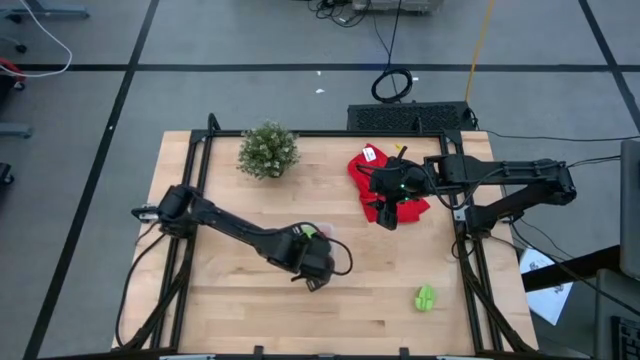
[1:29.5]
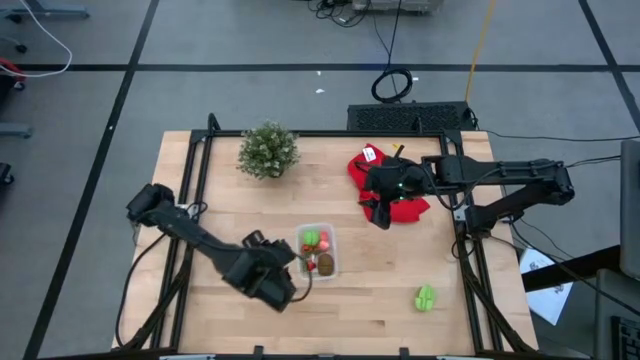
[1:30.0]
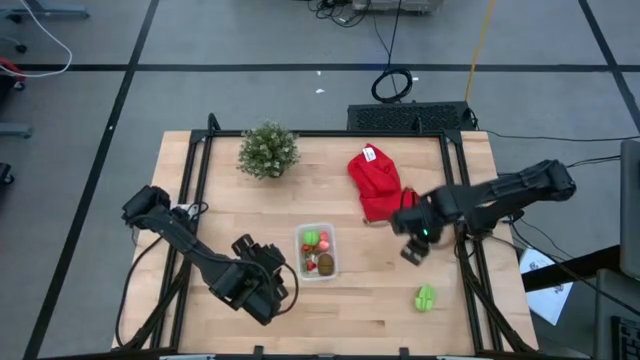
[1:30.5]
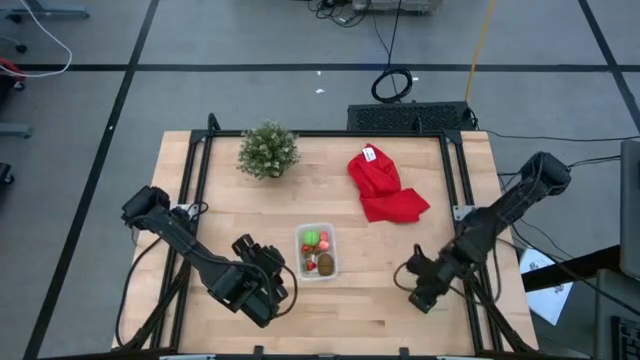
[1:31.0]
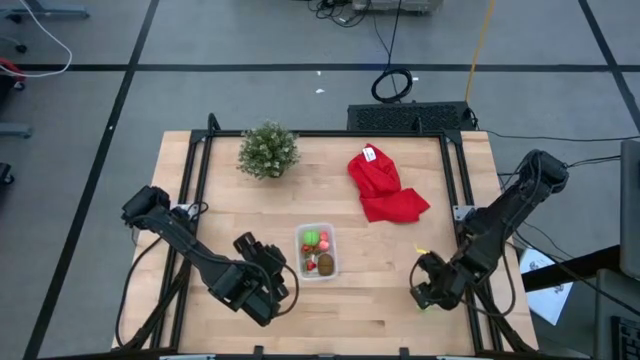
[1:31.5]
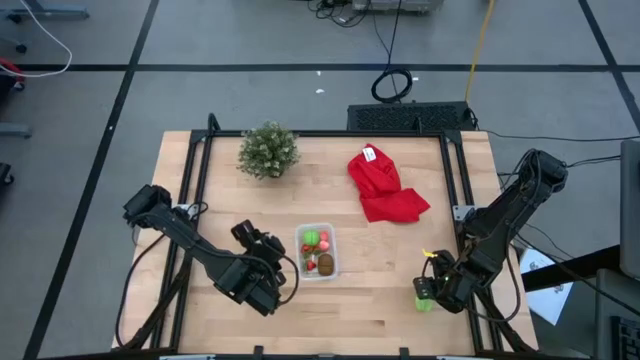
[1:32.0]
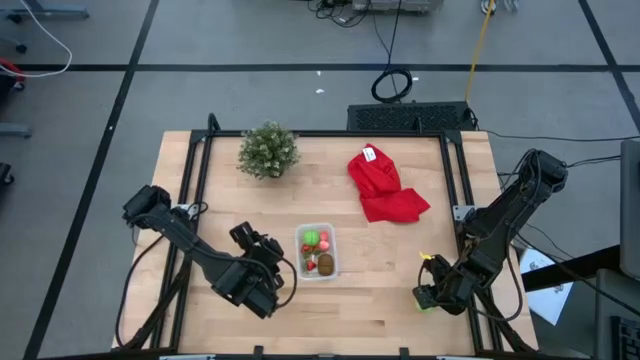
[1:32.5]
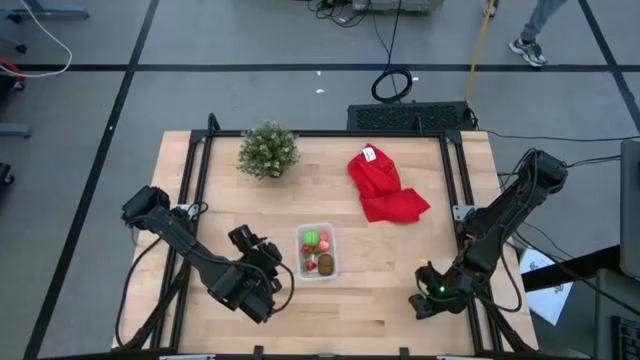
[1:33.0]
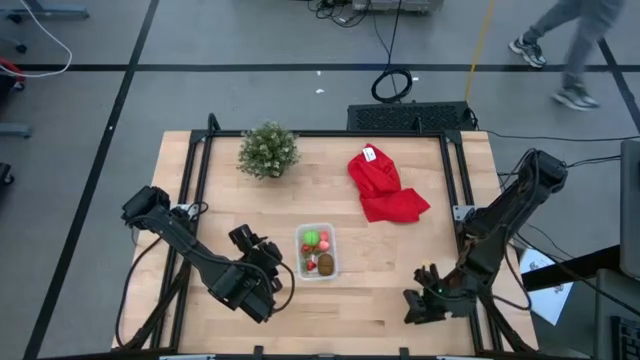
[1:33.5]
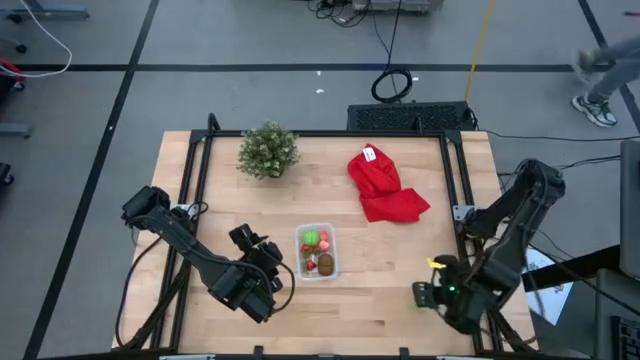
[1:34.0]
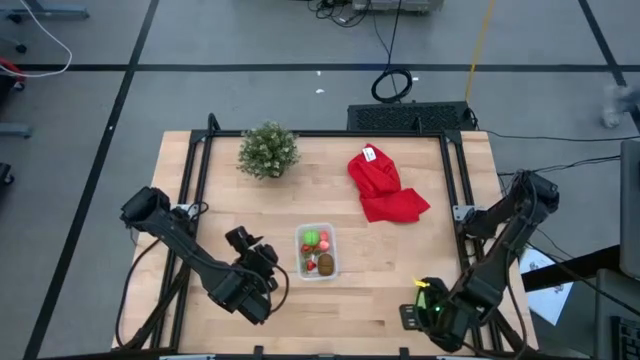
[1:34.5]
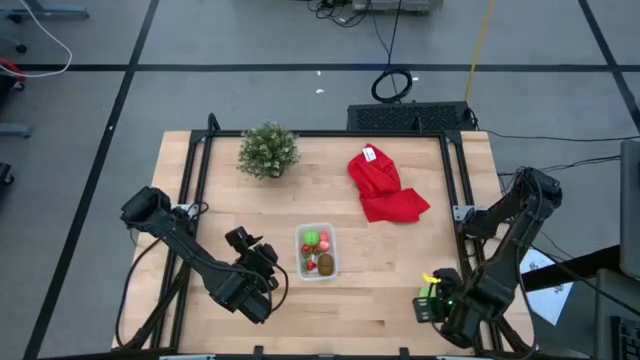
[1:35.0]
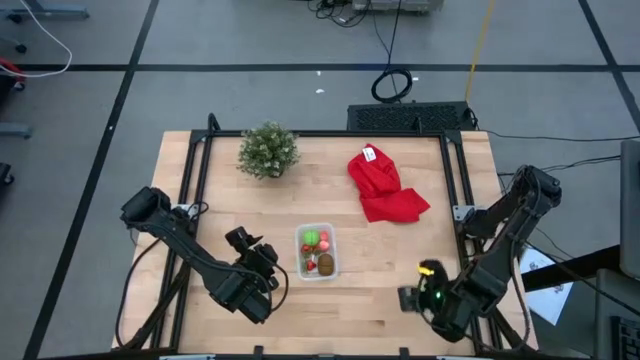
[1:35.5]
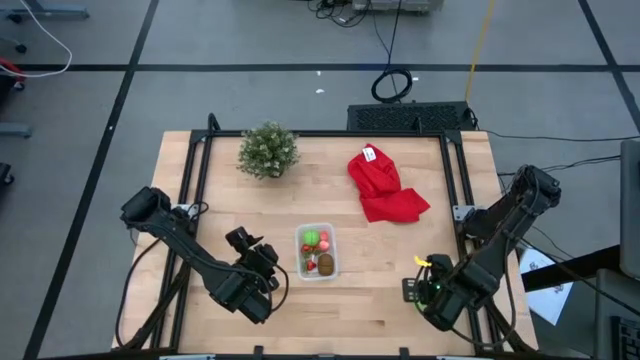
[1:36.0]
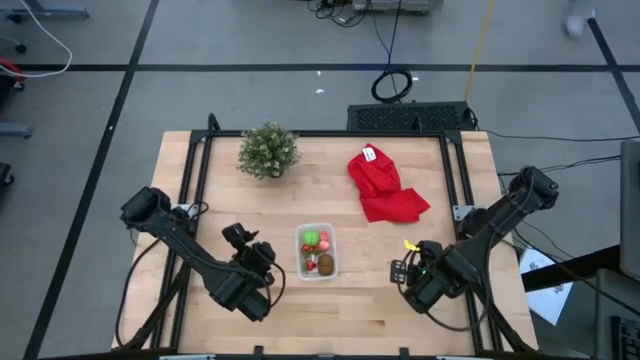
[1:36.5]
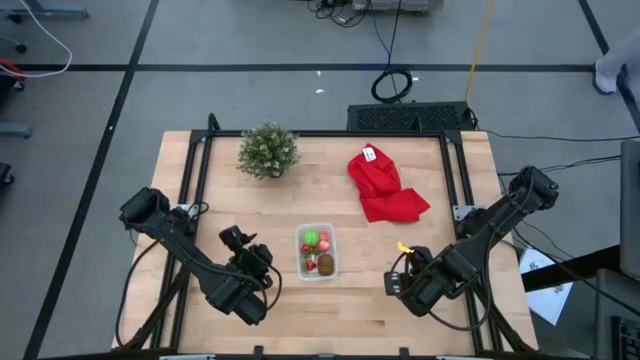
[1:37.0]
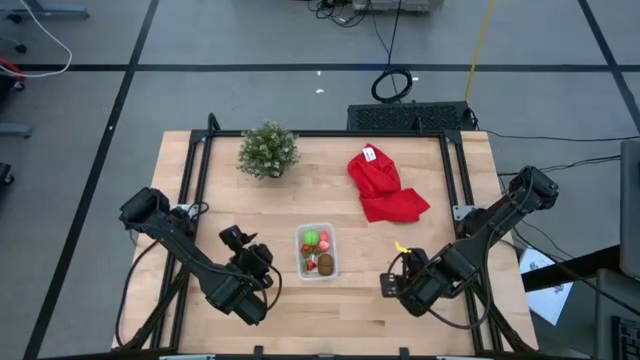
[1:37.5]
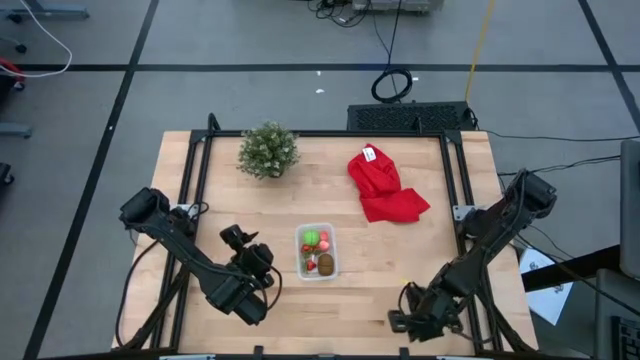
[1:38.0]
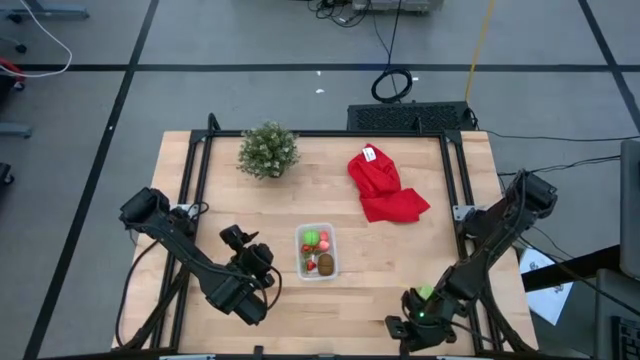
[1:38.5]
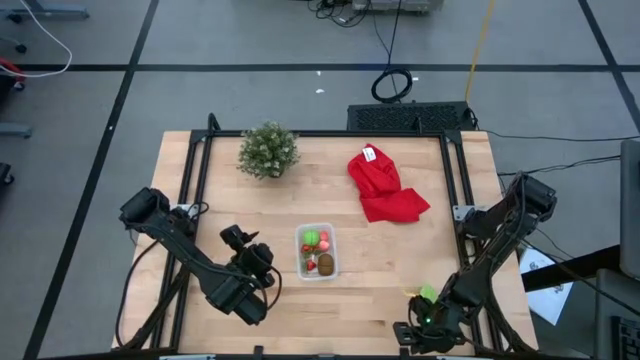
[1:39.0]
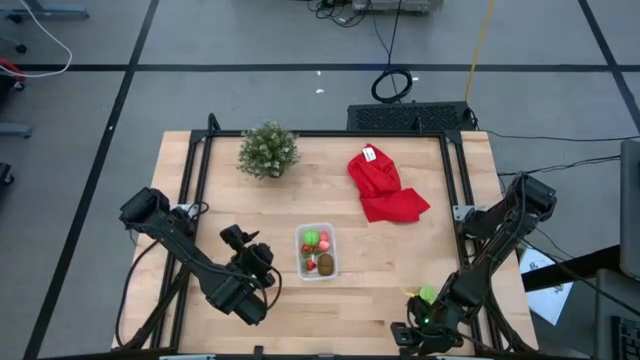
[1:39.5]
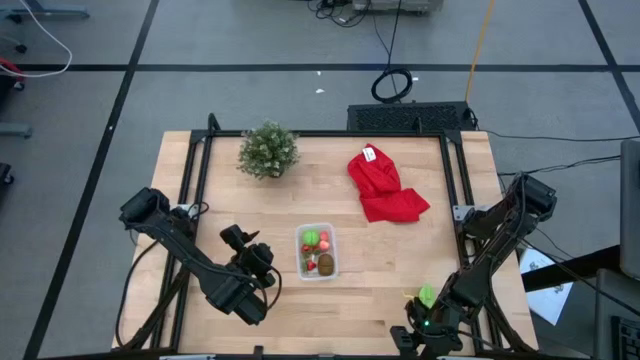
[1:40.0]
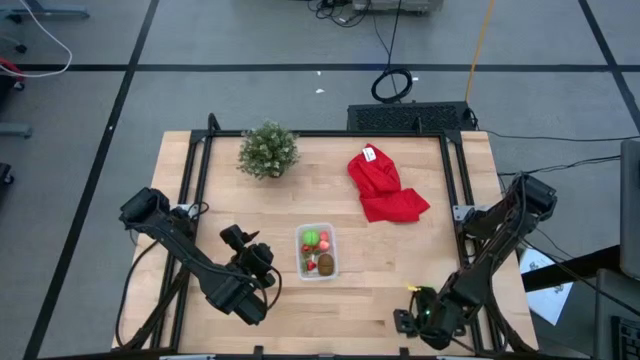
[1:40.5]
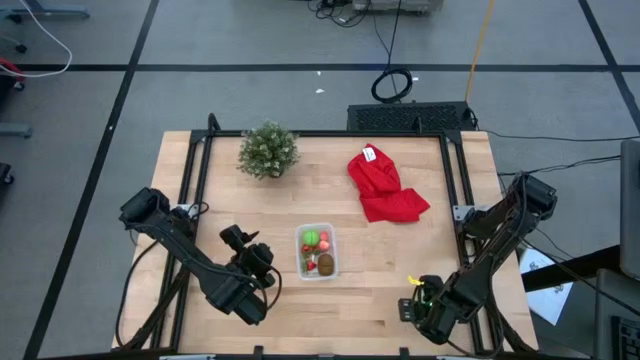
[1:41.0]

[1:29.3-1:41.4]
Task: Pick and placing Produce into tupperware
Put the green starfruit into the transparent bin

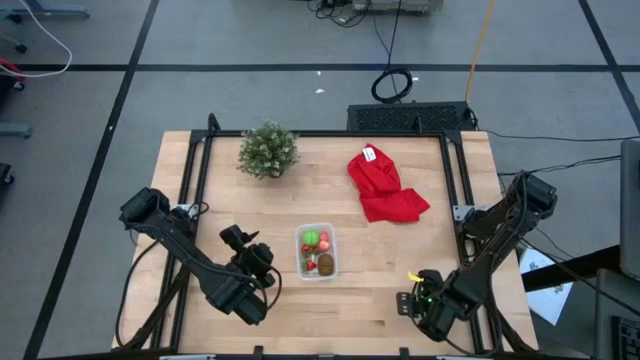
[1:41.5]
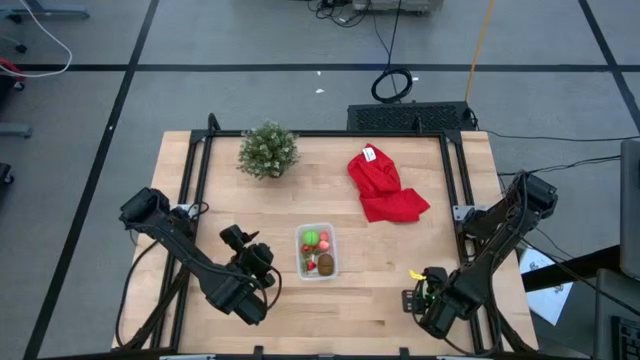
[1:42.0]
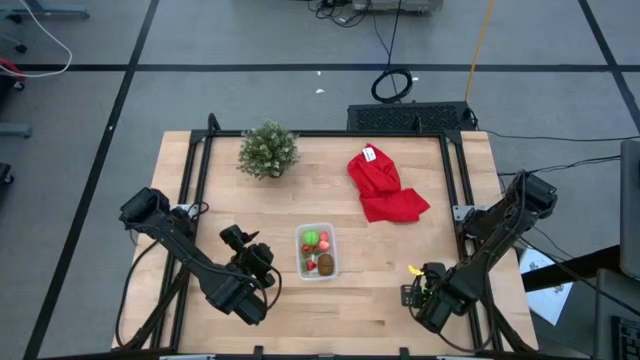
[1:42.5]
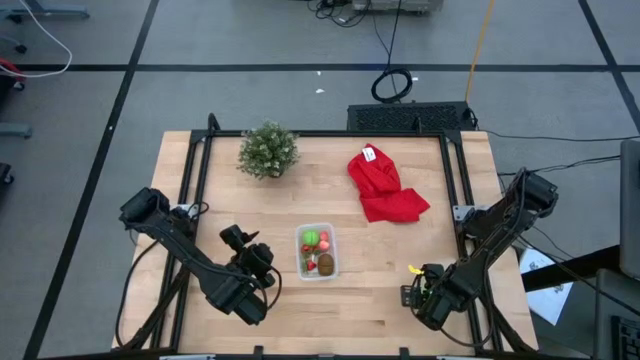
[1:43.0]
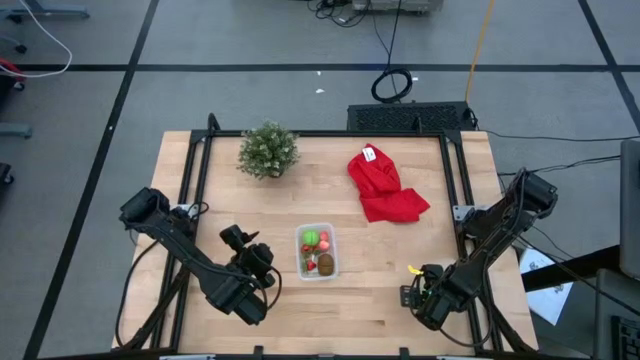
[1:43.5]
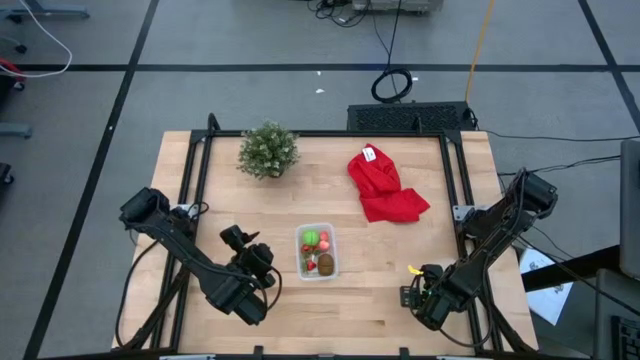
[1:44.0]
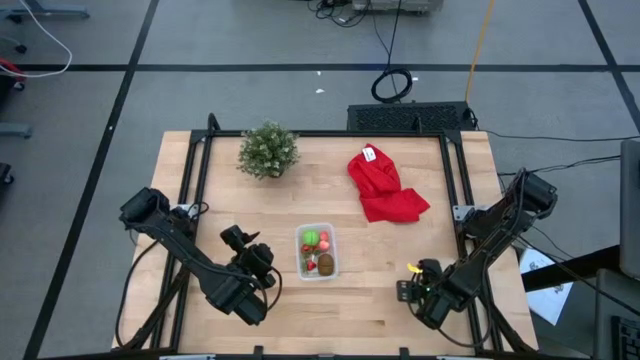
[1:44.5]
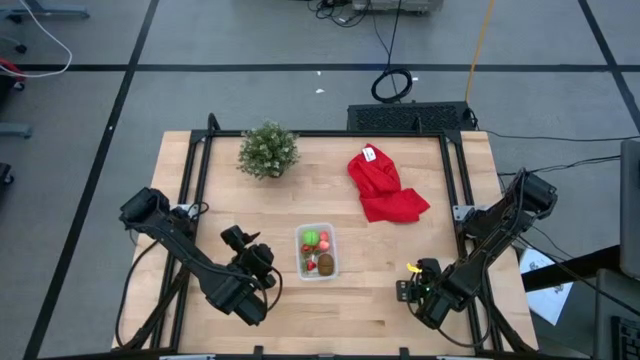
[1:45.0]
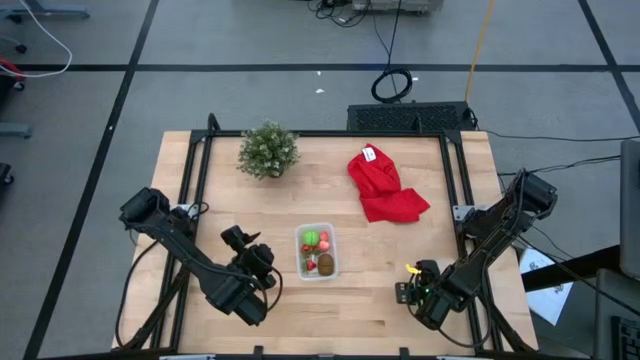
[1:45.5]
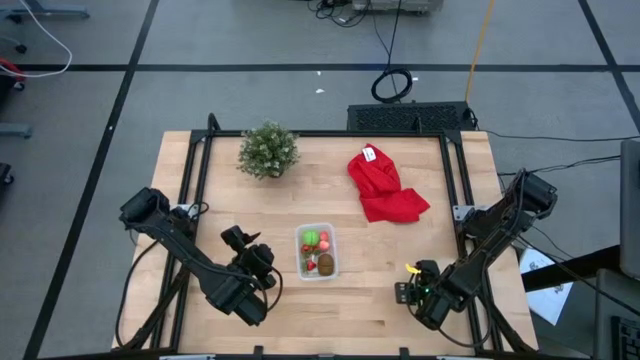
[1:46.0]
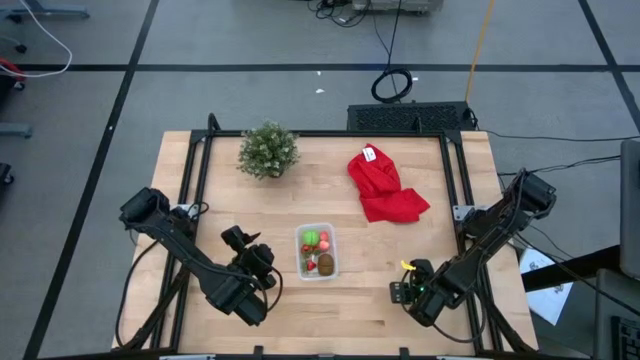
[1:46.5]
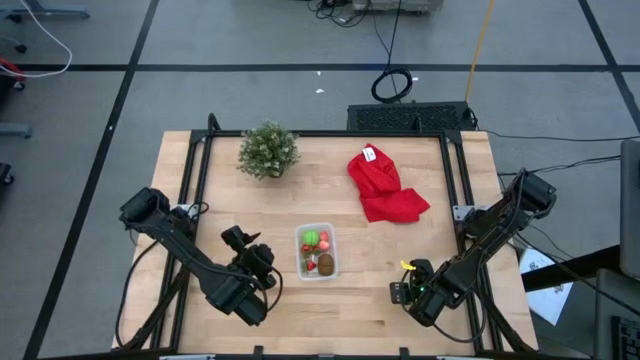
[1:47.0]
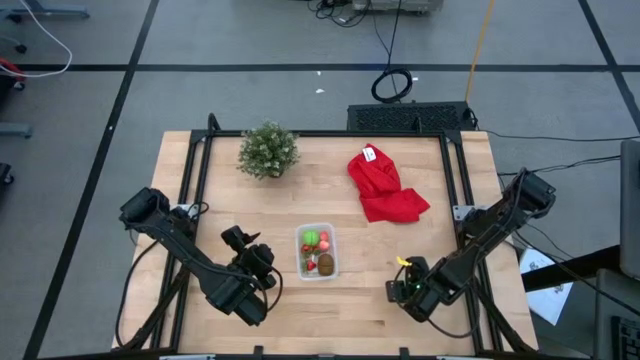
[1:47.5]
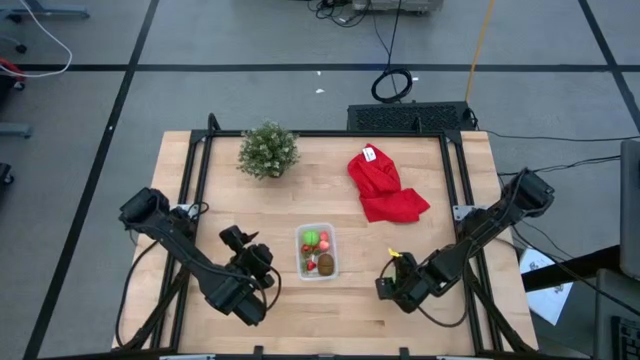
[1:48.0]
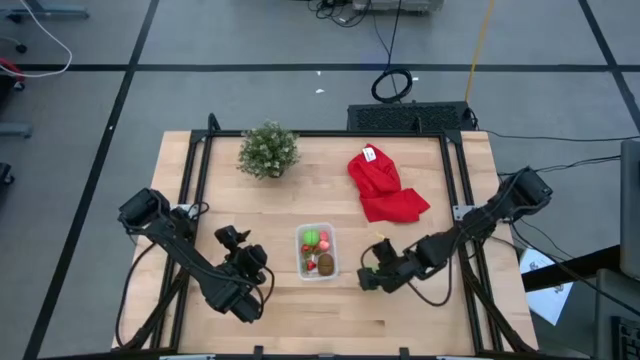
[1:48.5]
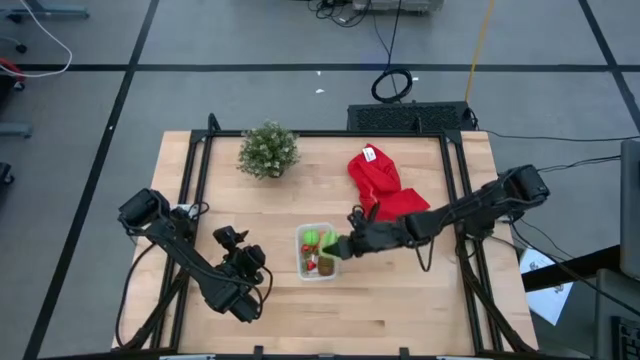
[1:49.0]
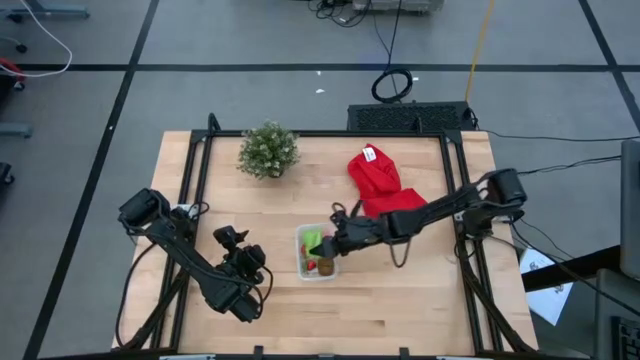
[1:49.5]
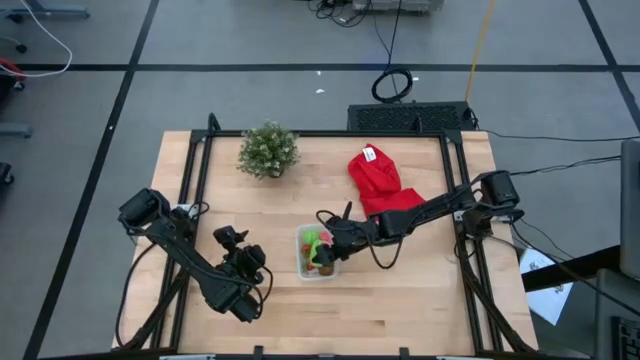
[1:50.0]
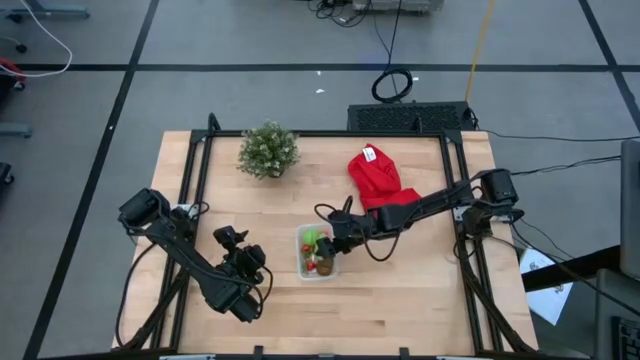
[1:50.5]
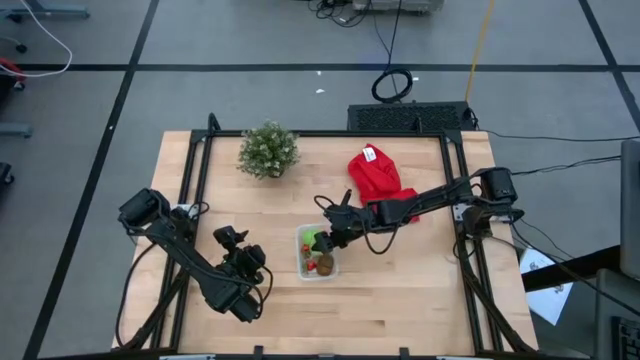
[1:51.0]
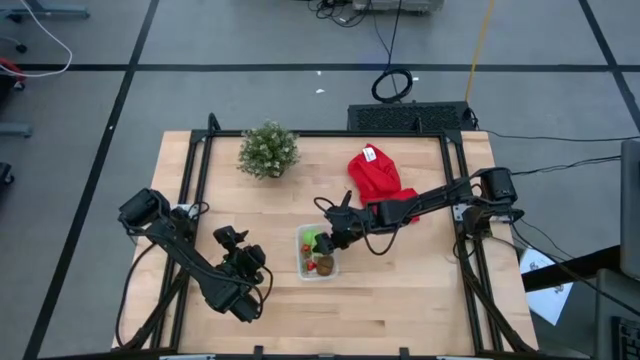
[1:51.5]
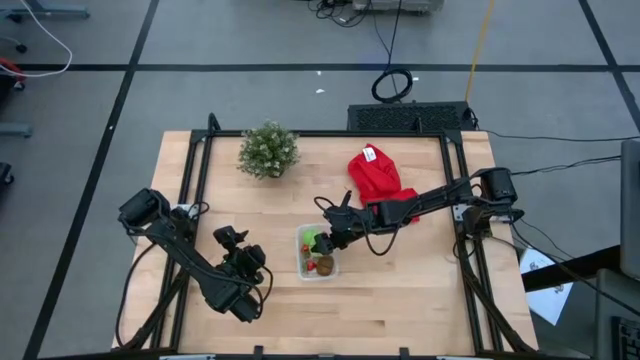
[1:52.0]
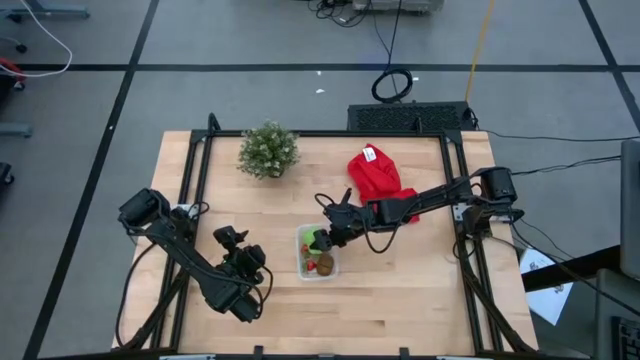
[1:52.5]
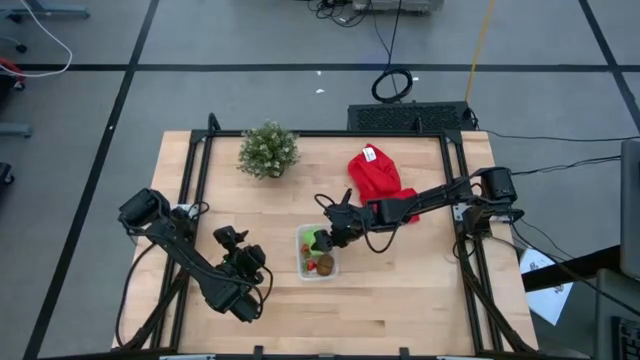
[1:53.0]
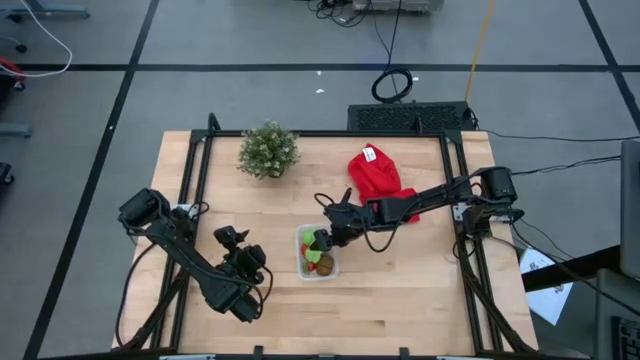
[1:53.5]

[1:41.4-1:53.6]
Put the green starfruit into the transparent bin
